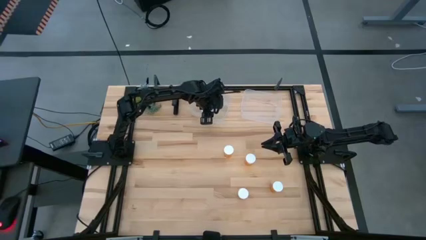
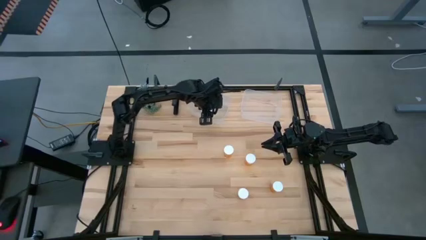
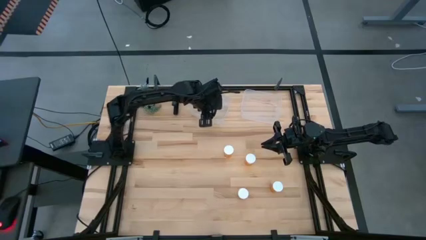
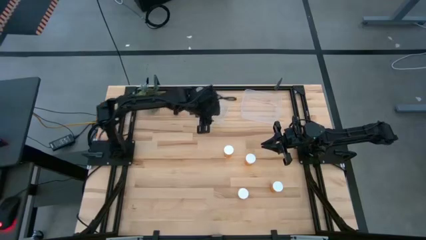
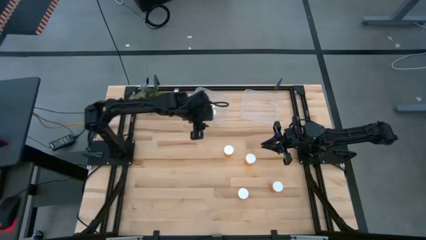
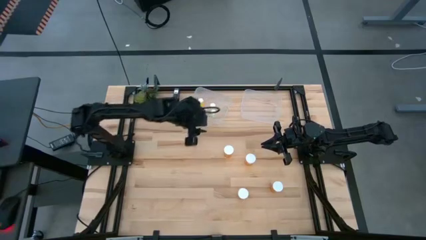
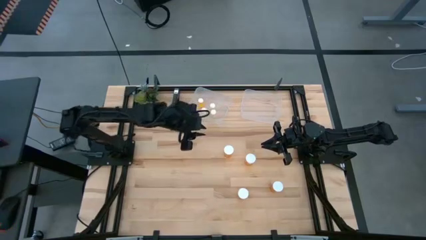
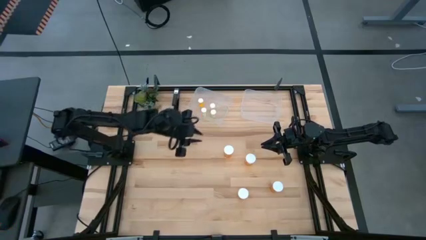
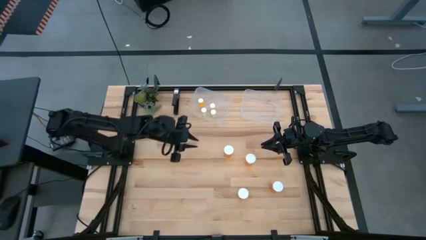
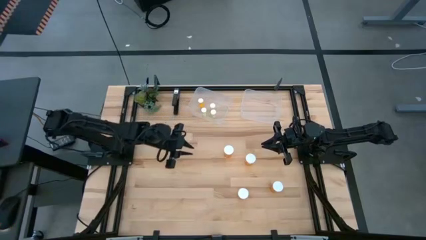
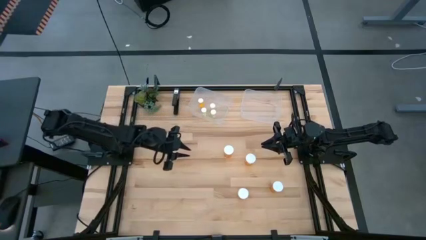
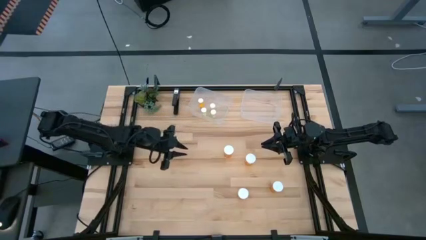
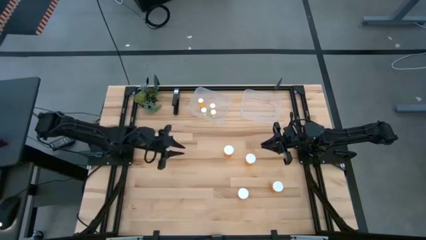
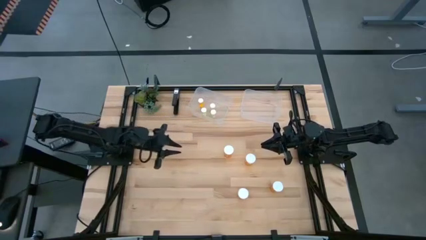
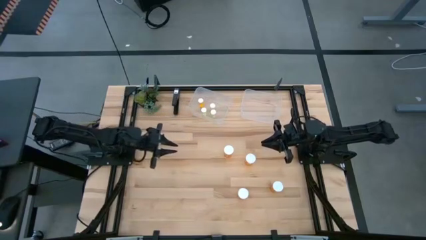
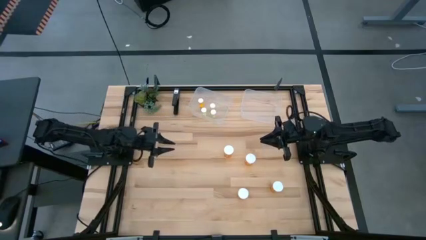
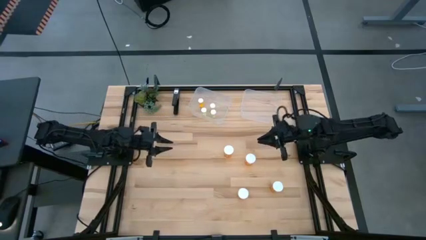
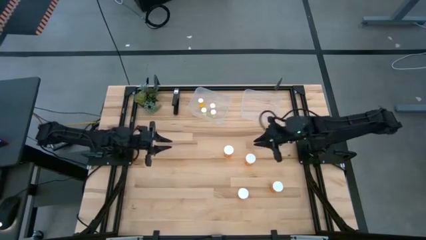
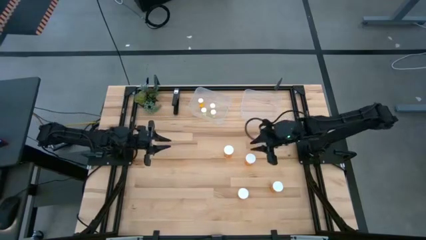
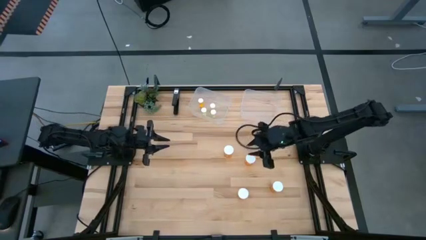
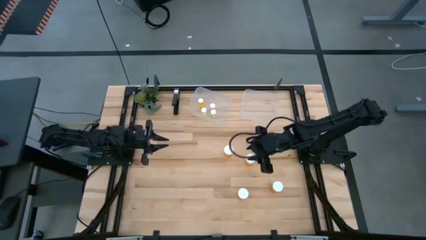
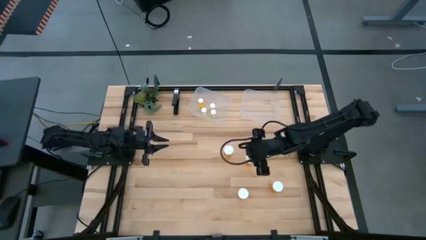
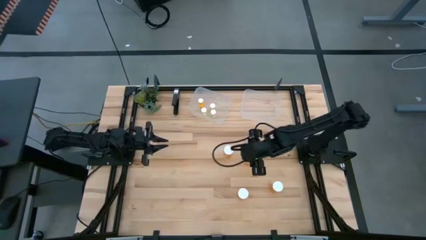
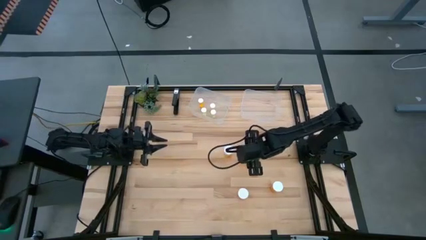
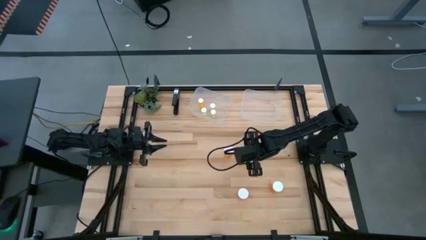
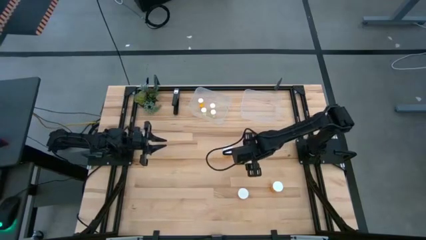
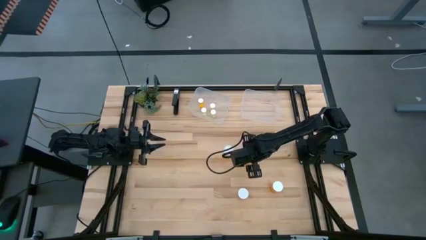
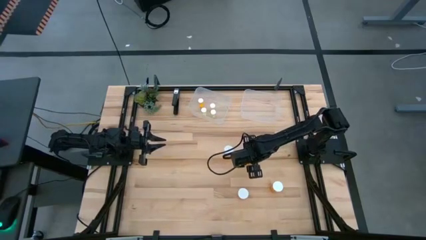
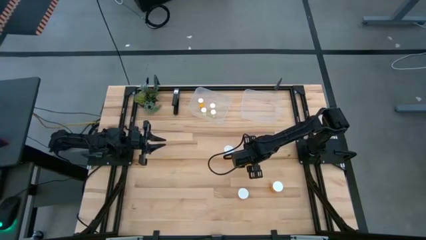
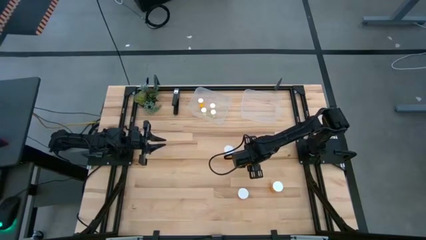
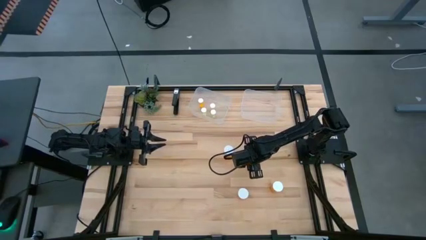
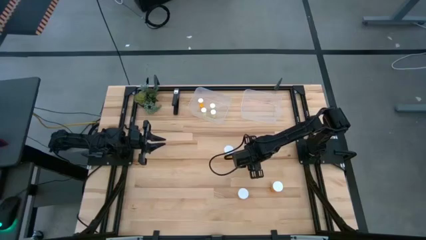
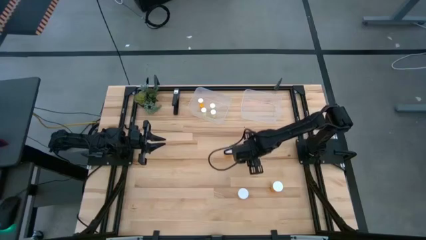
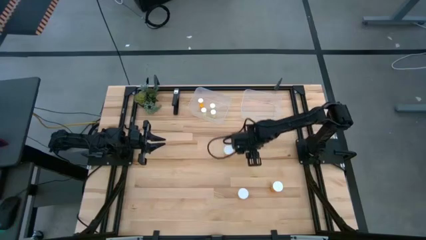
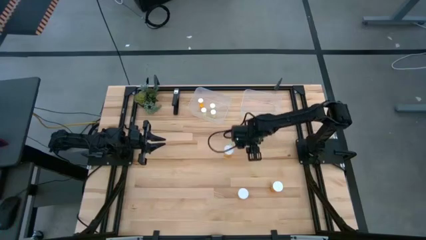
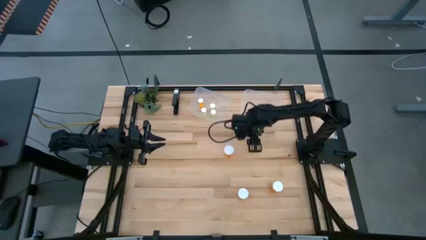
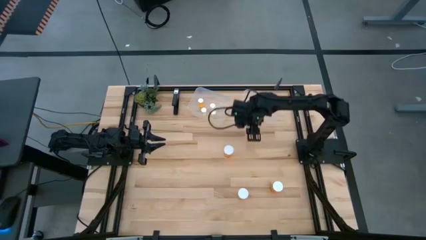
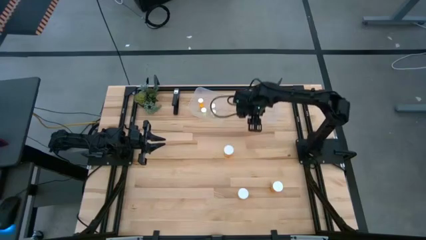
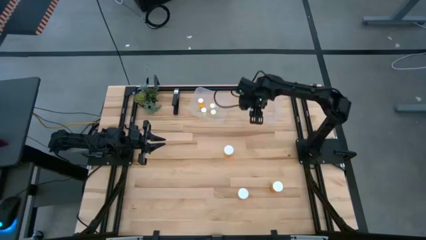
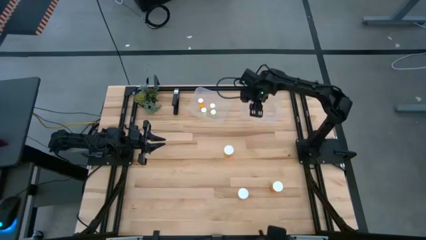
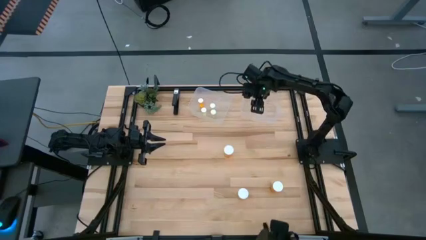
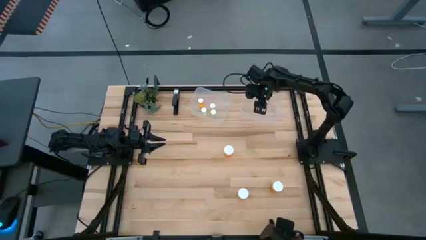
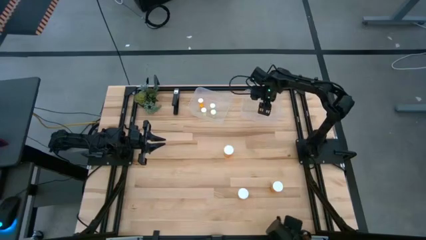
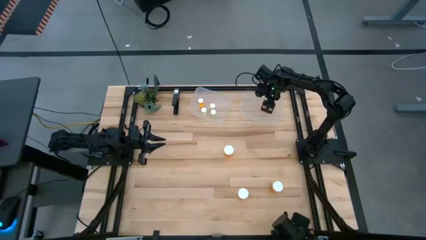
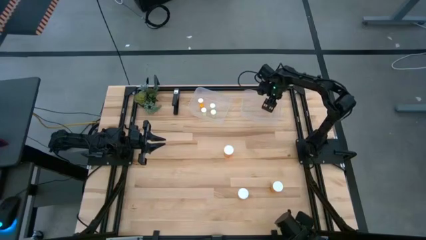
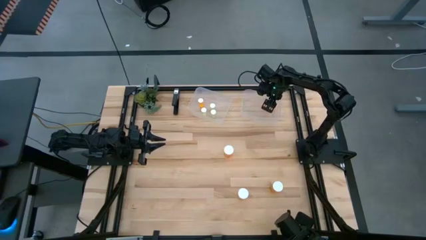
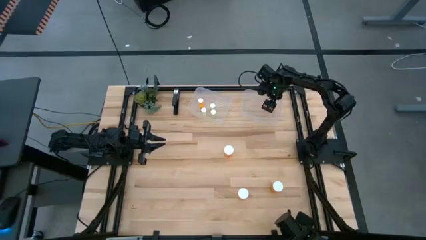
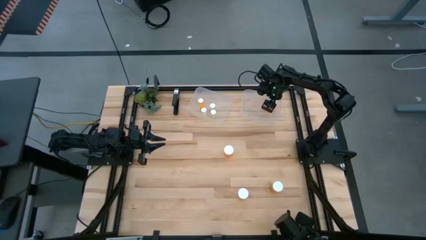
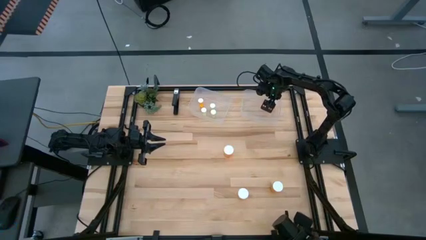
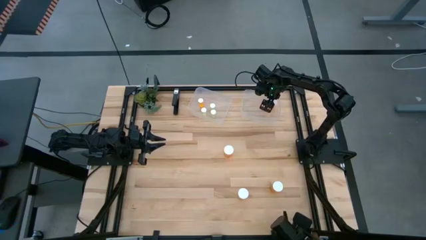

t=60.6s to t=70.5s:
Task: Pick and place medicine bottles into bin by pill shape (circle, oval)
Put the big orange pill bottle into the right transparent bin

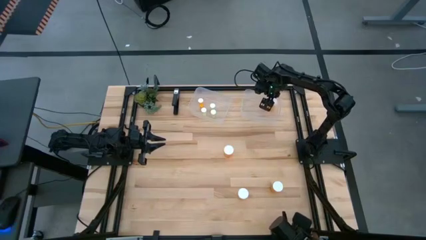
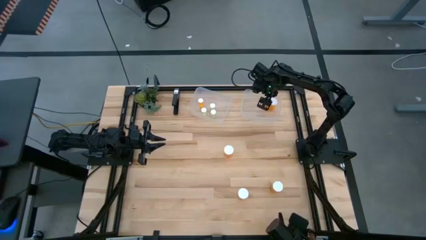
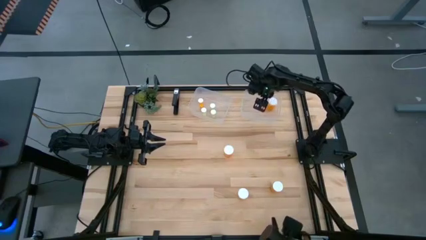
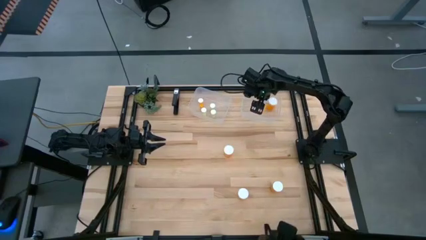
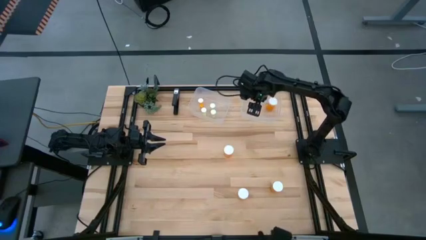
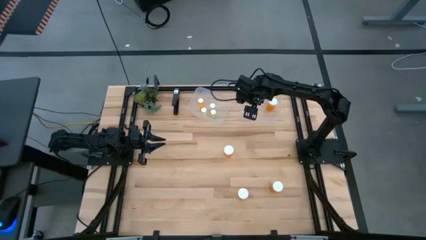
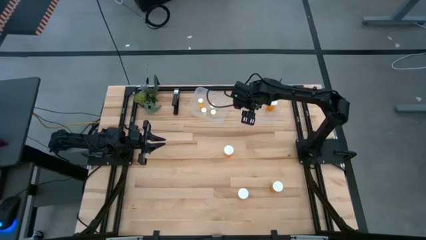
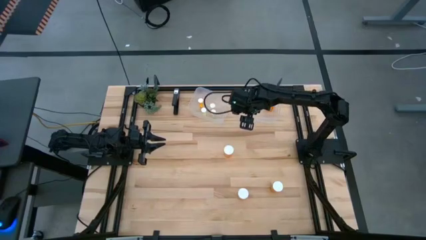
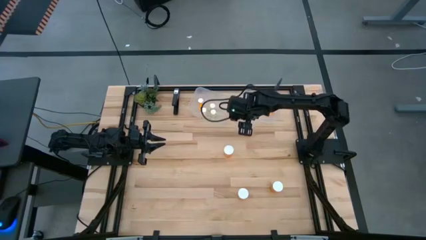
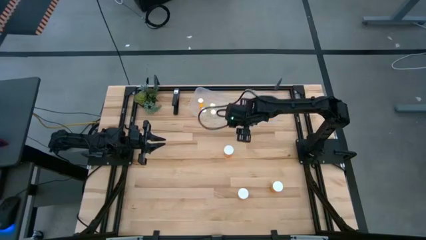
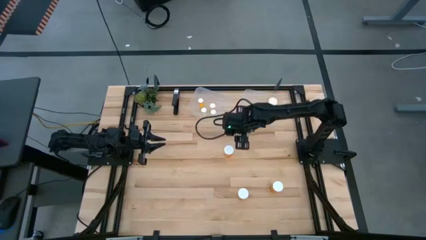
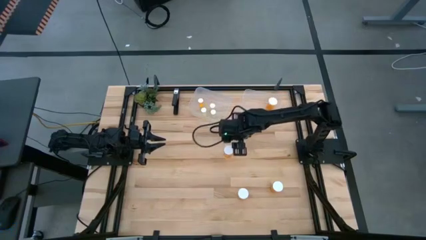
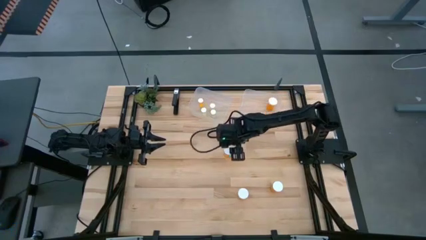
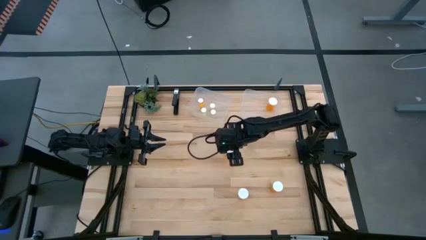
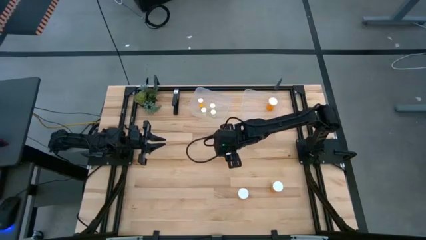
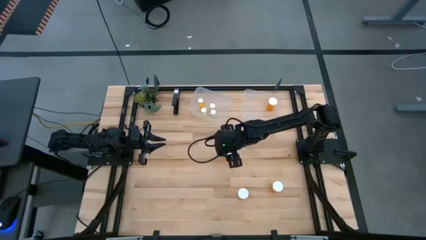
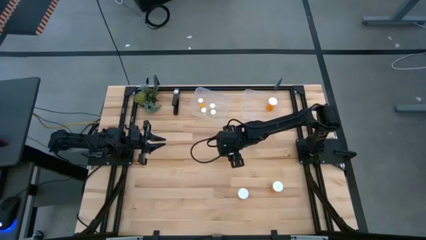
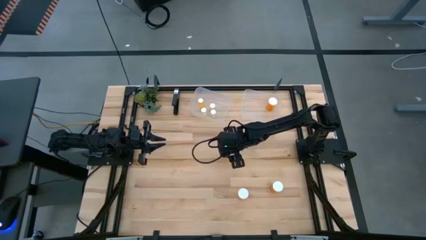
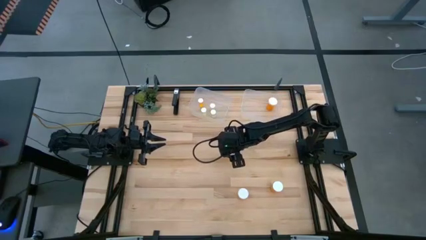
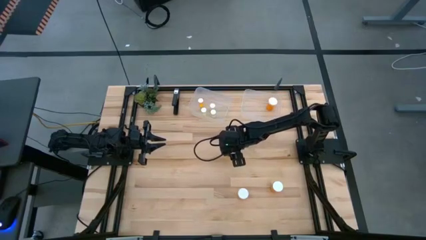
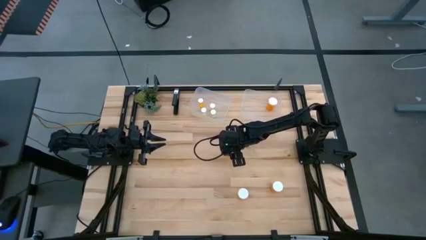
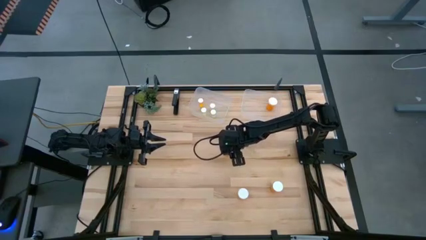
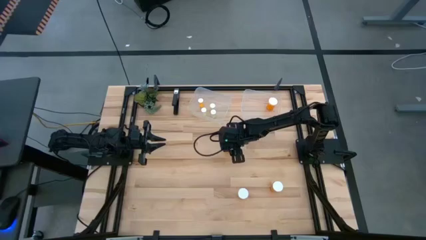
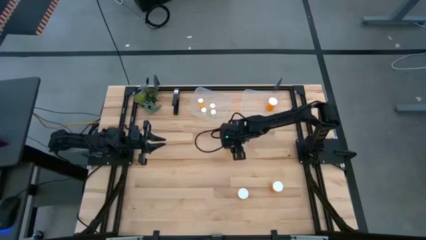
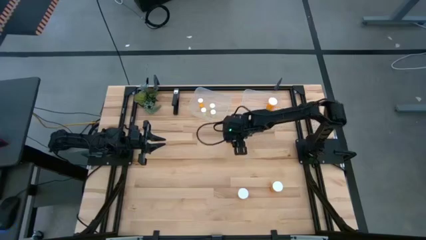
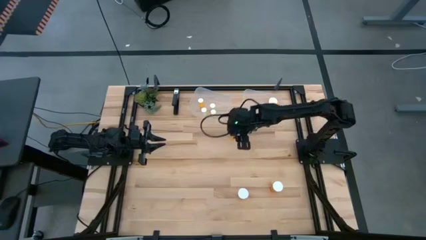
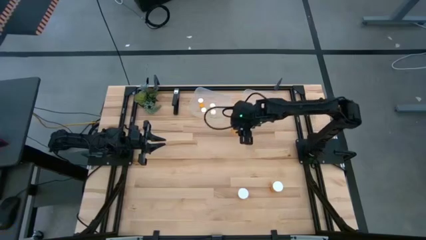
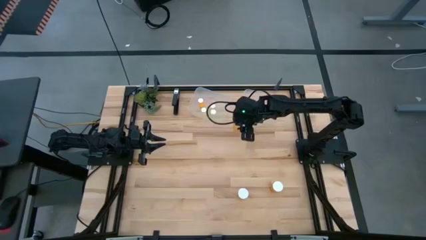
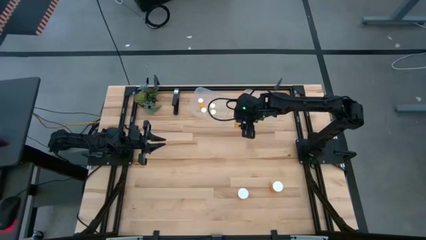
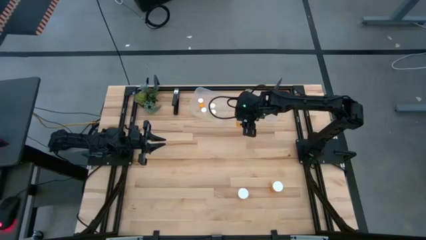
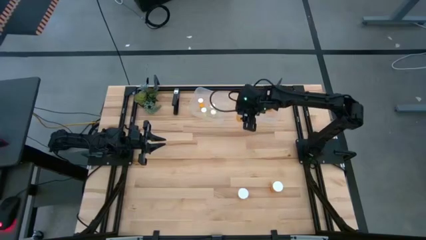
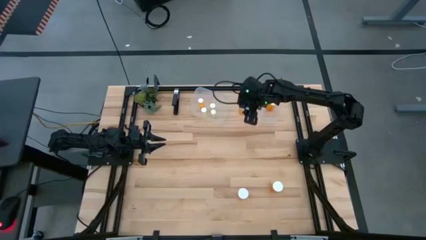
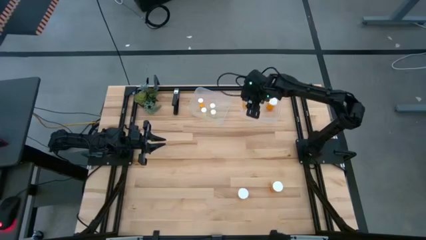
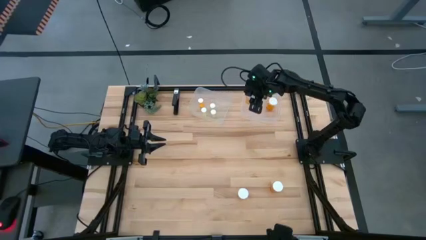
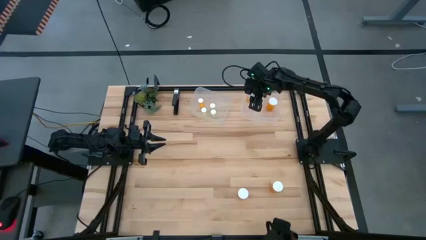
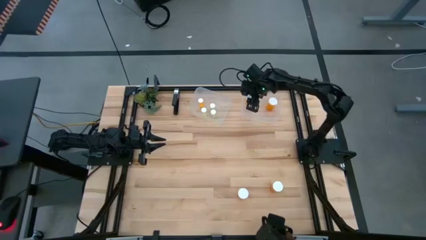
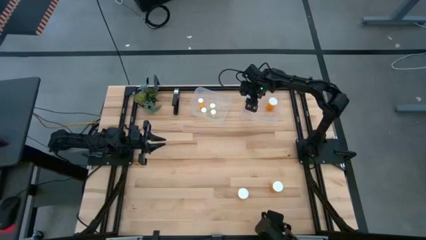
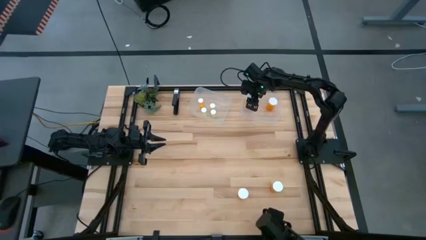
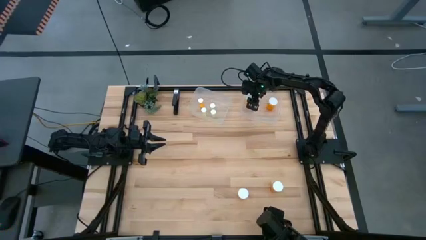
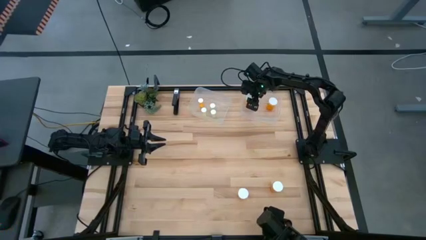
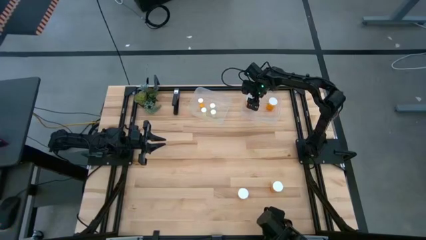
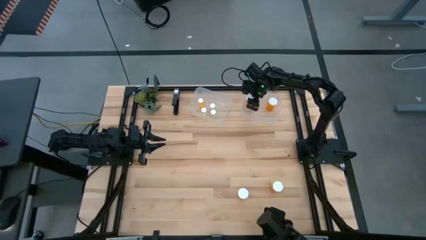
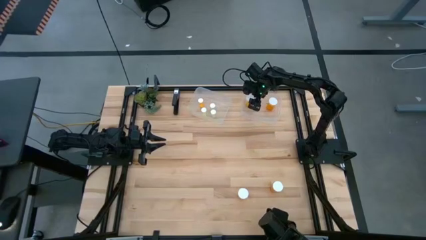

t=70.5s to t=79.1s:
Put the big orange pill bottle into the right transparent bin
